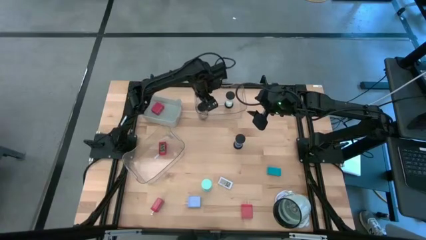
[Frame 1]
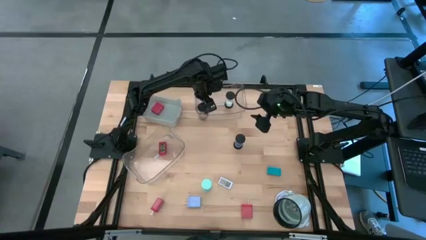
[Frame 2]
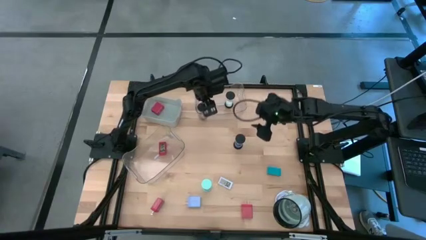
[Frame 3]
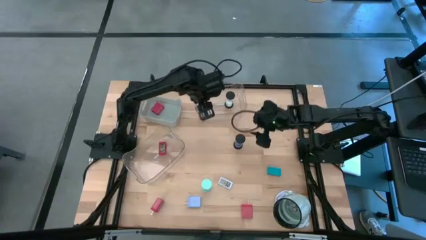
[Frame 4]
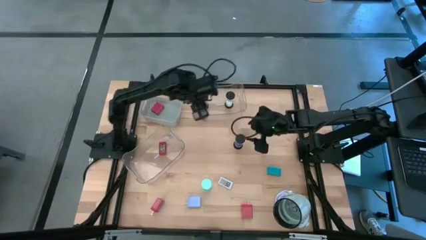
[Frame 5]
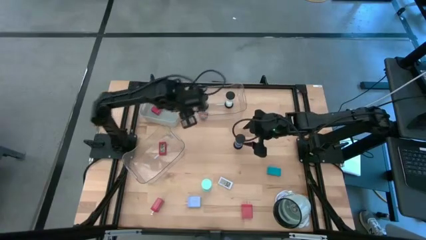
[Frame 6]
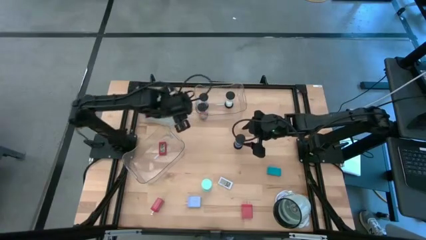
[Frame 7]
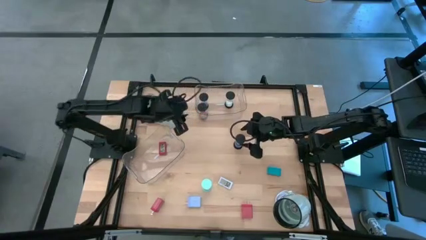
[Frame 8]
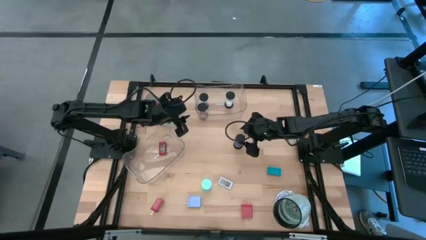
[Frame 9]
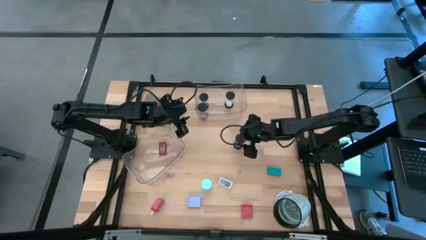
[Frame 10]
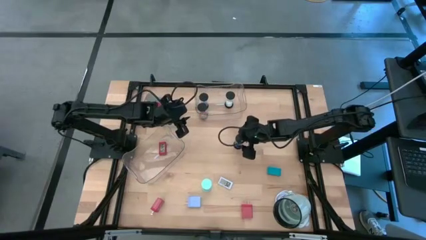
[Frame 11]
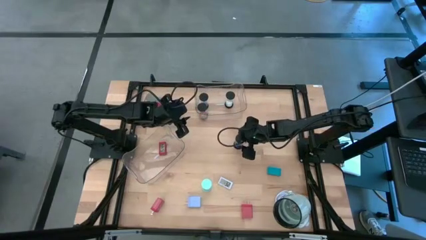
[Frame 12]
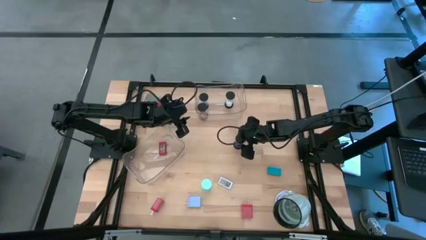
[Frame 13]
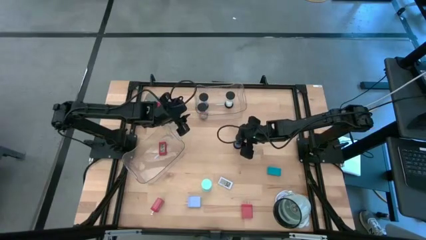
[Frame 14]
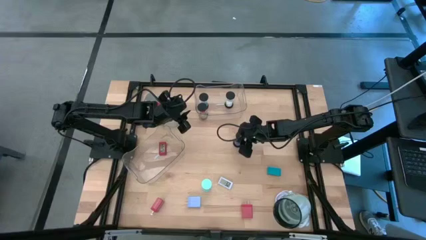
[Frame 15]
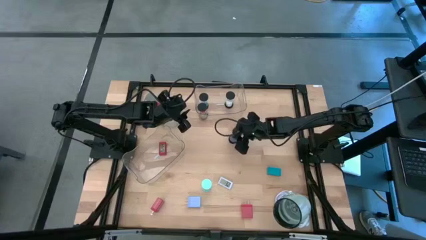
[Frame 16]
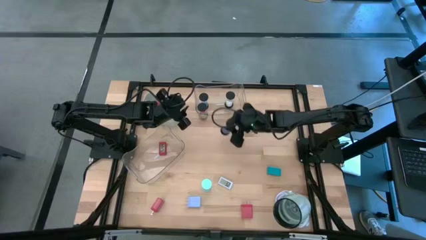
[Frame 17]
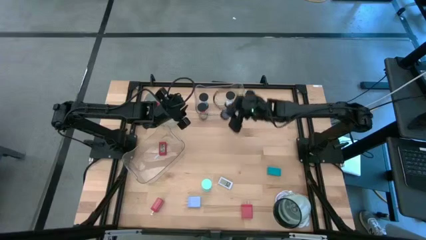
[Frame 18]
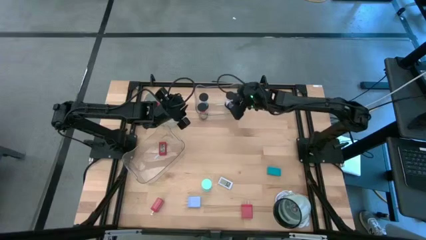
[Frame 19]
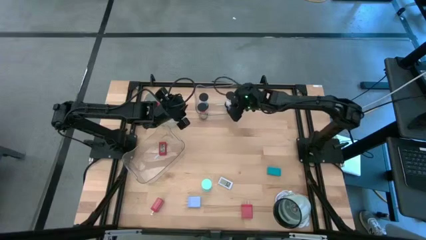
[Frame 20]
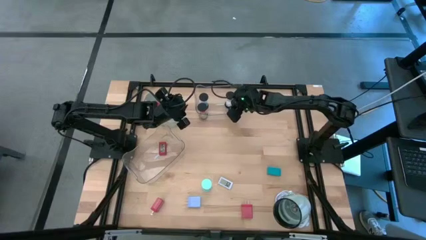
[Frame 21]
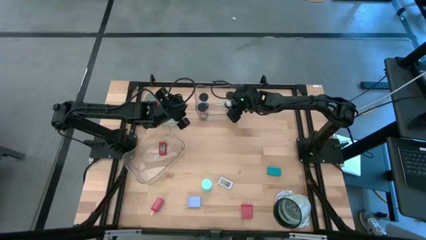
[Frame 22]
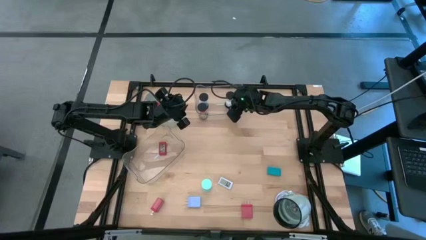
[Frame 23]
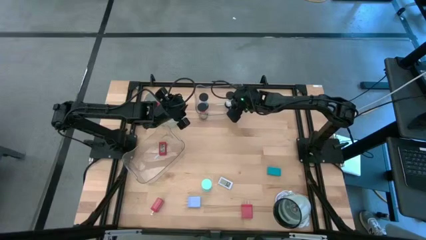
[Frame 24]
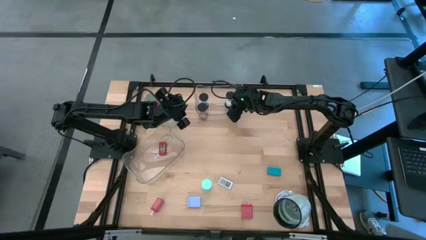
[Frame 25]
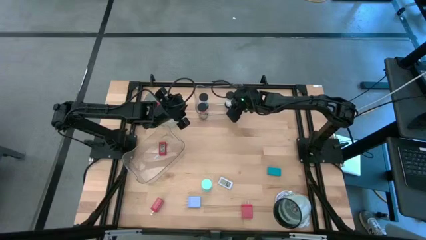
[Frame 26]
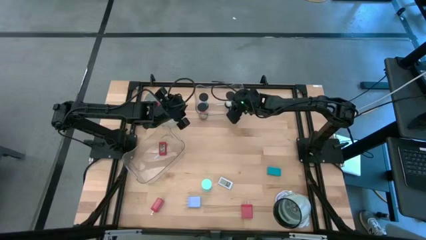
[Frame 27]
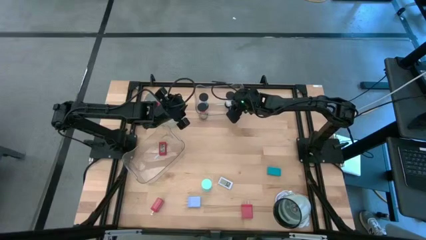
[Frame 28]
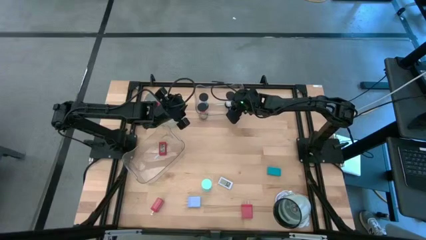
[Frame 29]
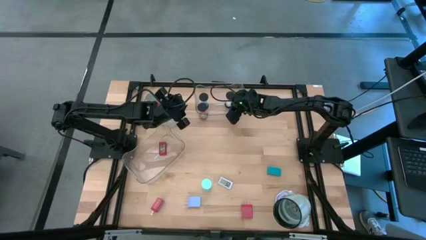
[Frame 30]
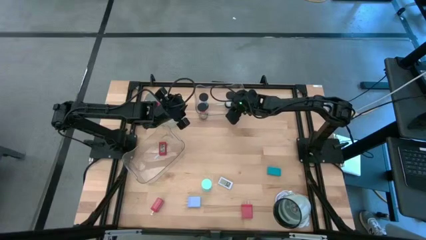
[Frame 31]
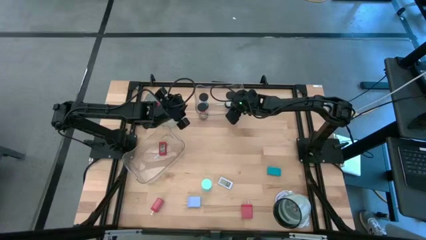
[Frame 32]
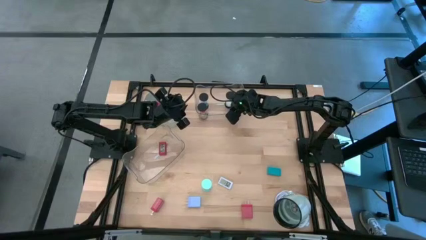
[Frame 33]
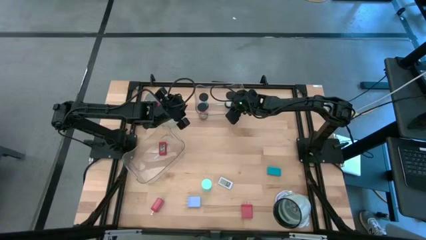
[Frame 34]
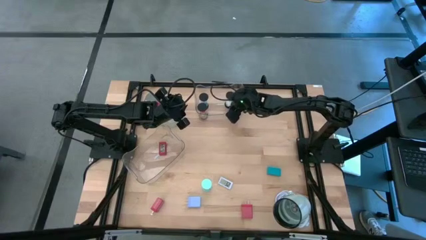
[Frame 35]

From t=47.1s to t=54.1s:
Task: Pick & Place Office items
Put the purple hourglass into the top transparent bin

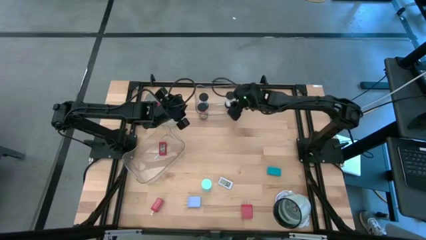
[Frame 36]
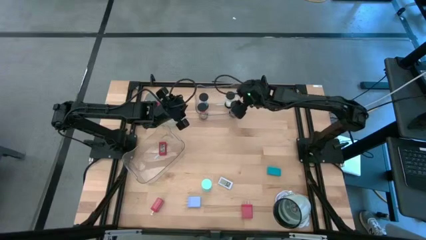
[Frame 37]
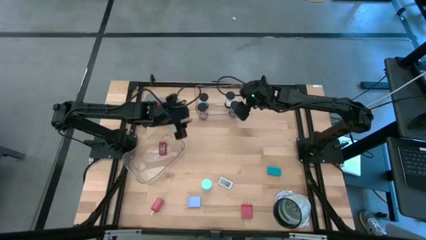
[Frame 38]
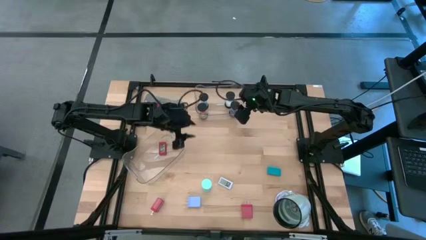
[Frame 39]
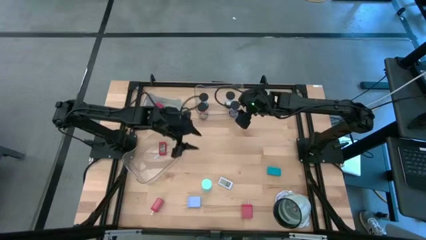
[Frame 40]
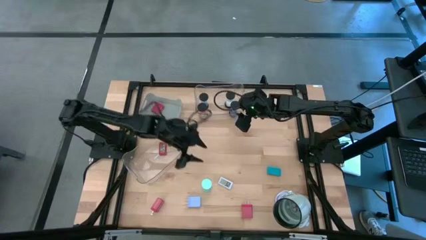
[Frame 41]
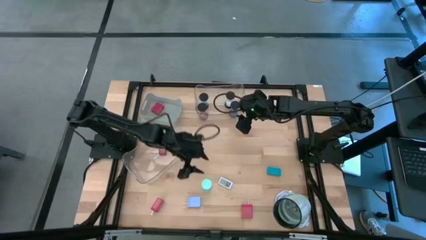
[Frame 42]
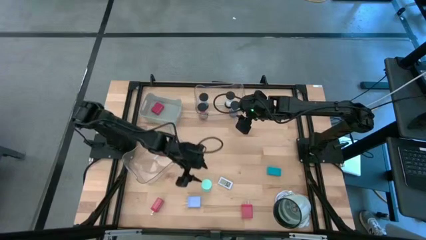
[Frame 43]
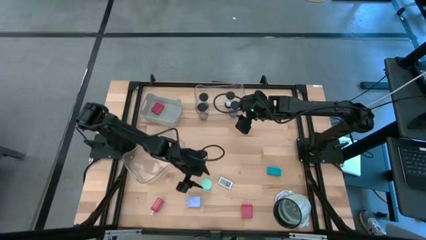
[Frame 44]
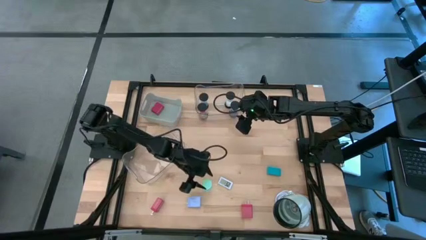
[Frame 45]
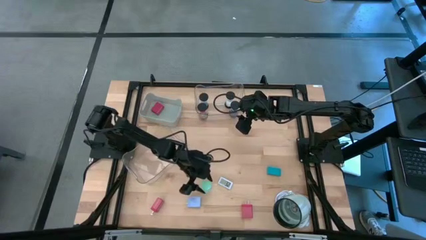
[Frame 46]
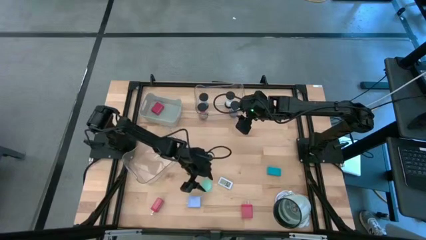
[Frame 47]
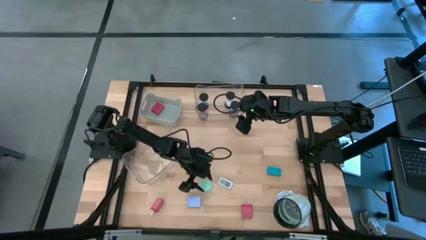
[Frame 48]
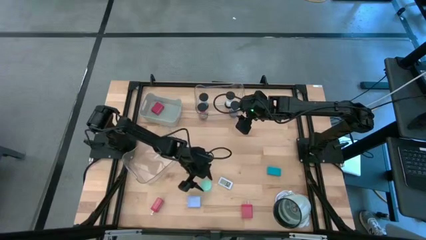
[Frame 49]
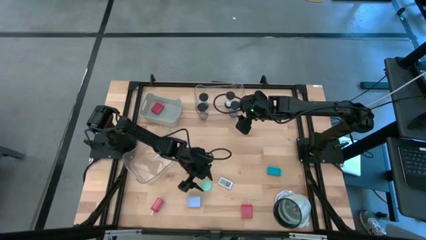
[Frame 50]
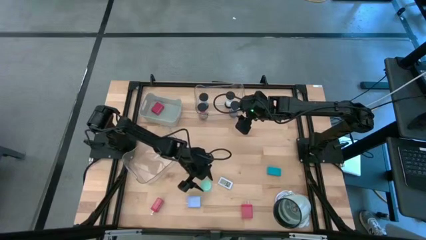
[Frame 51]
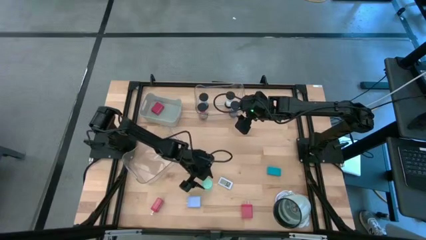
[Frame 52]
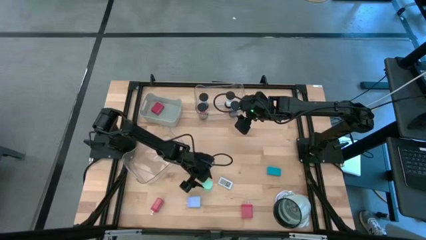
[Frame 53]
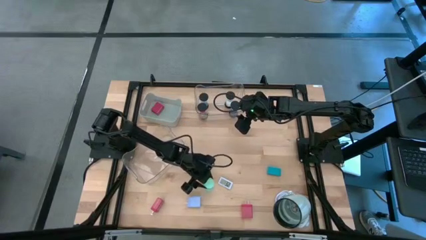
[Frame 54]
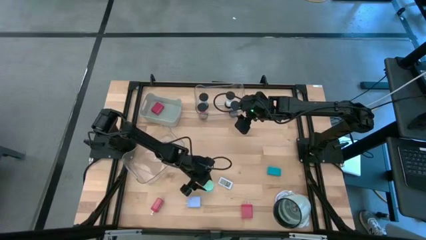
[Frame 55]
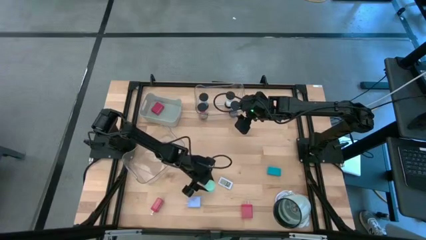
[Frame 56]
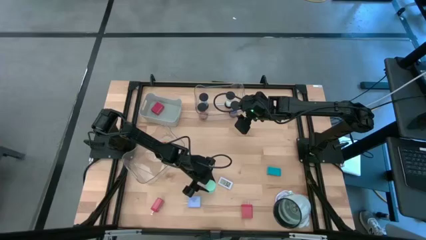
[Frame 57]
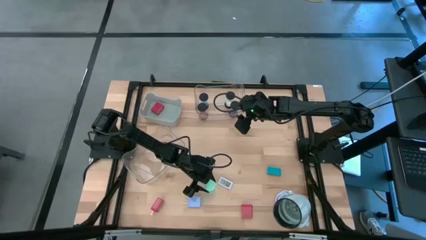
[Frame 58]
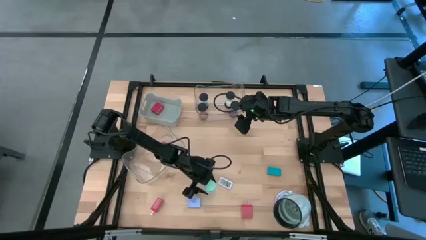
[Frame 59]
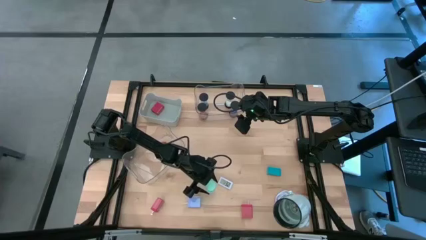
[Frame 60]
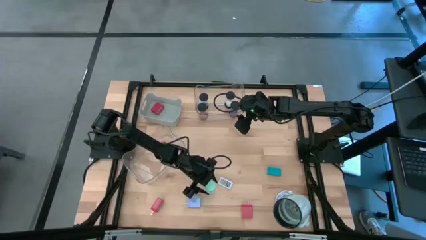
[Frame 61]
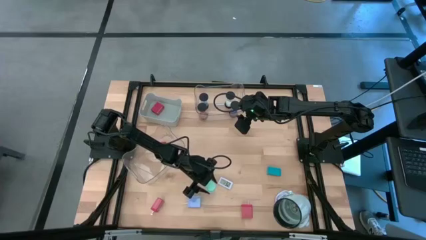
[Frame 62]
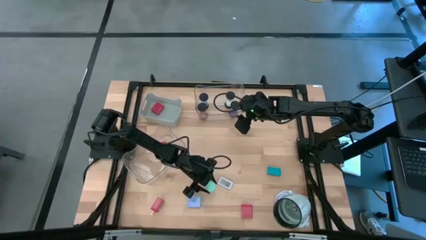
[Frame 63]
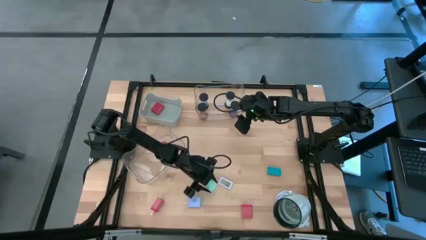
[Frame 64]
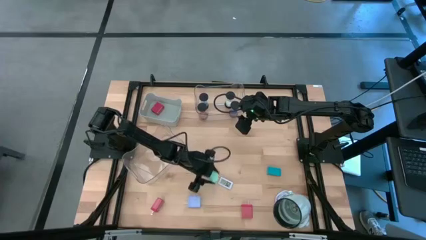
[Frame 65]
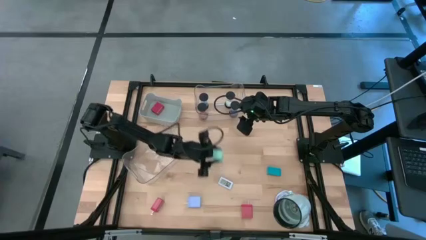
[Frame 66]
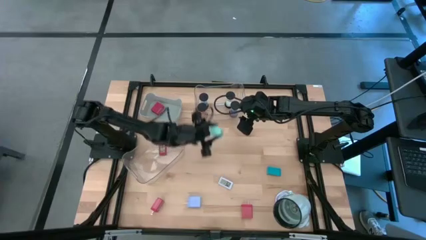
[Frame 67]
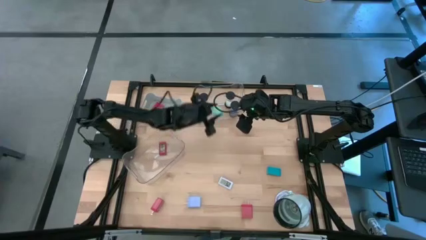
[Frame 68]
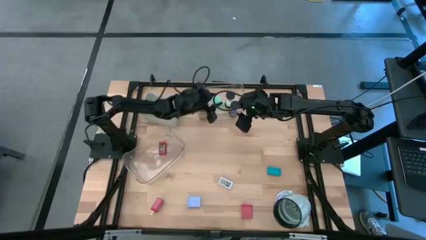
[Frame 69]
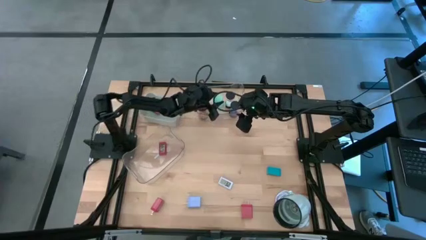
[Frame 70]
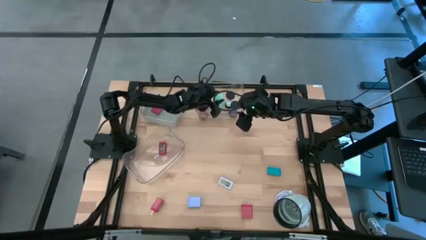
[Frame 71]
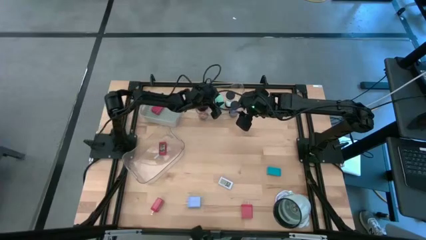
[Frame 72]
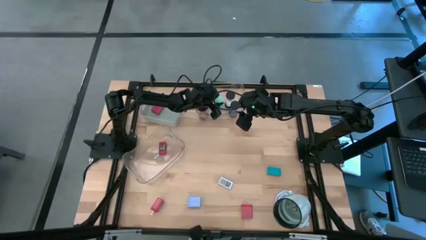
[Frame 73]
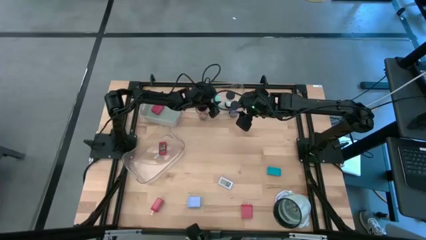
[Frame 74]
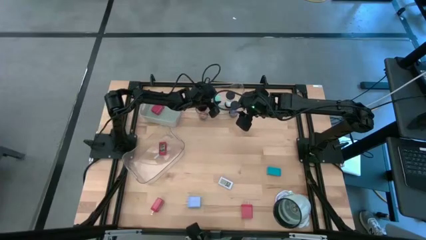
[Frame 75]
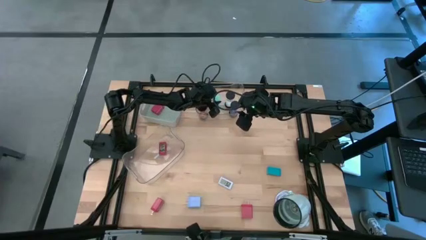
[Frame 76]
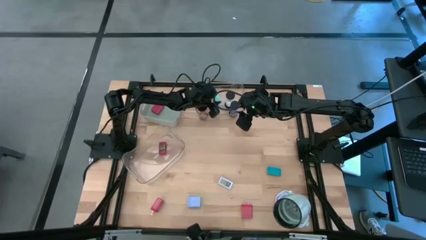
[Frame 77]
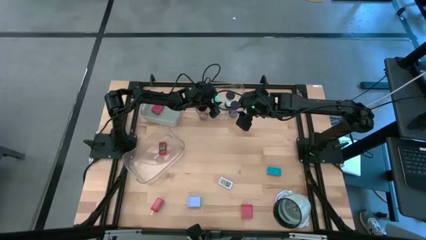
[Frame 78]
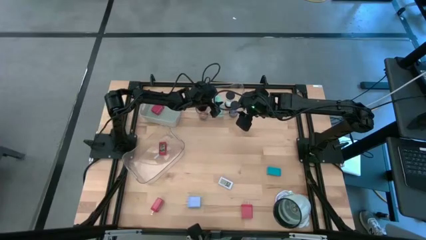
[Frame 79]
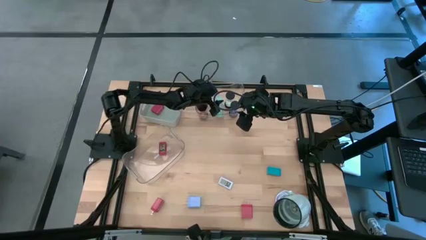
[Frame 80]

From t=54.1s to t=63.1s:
Put the light blue hourglass into the top transparent bin
